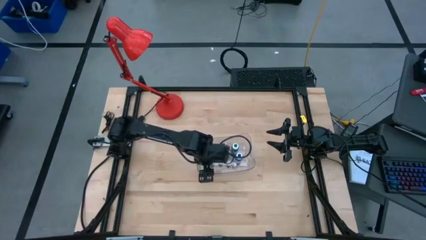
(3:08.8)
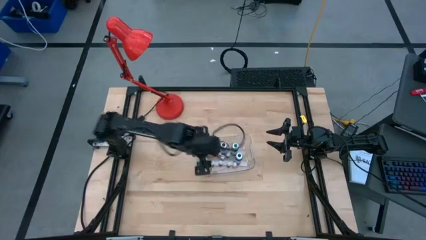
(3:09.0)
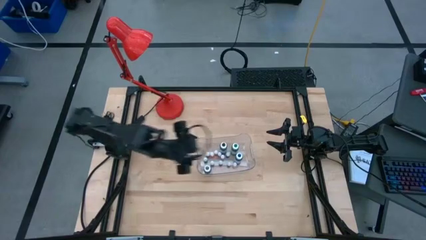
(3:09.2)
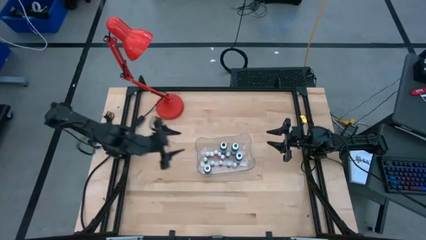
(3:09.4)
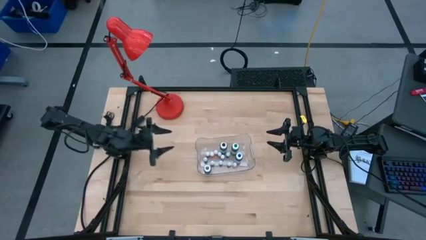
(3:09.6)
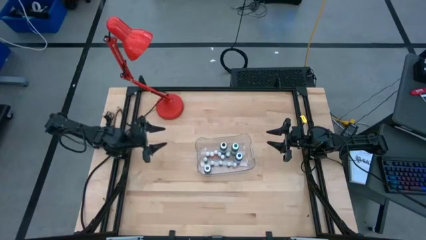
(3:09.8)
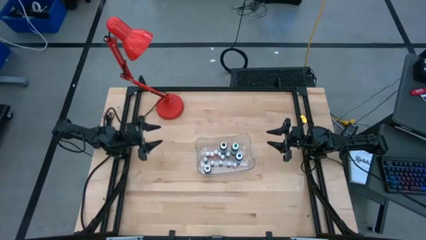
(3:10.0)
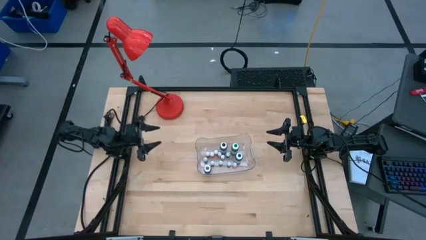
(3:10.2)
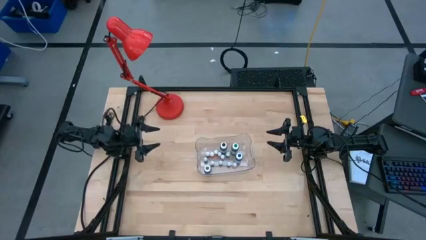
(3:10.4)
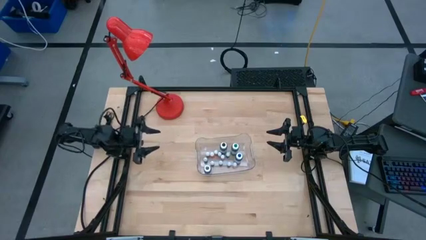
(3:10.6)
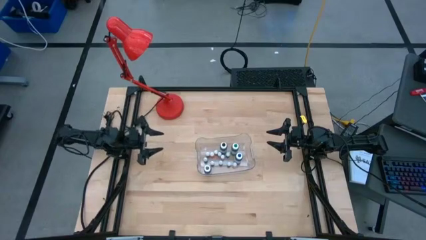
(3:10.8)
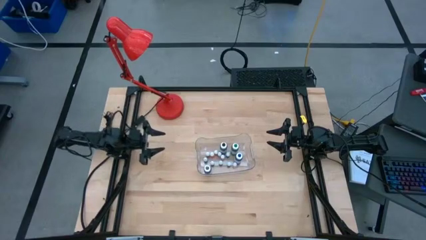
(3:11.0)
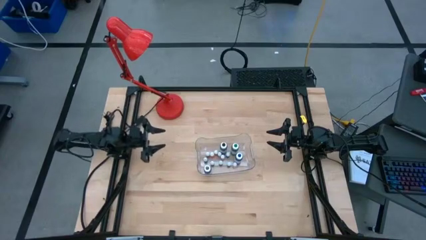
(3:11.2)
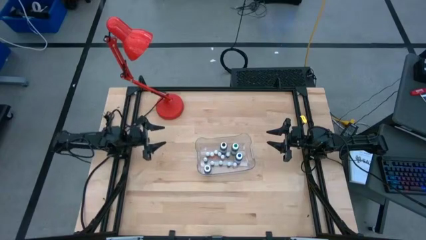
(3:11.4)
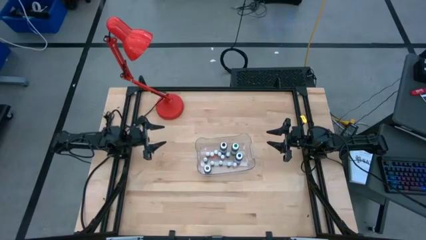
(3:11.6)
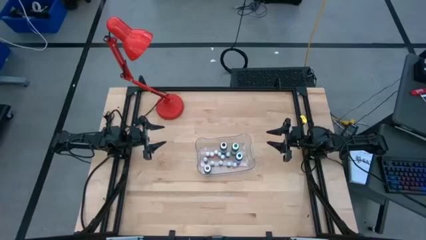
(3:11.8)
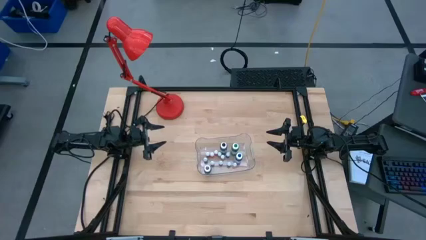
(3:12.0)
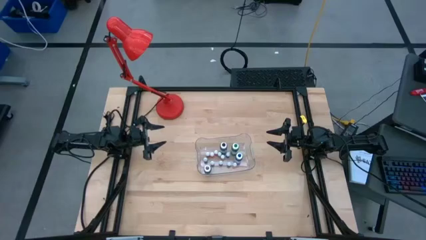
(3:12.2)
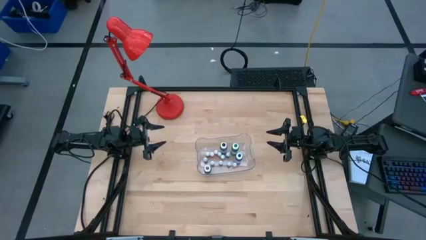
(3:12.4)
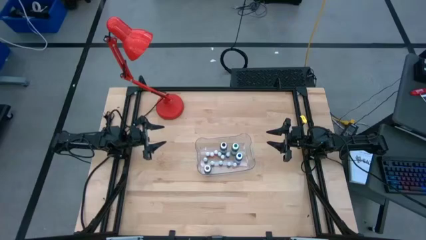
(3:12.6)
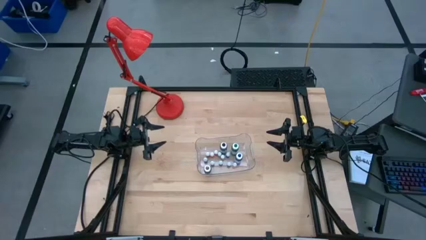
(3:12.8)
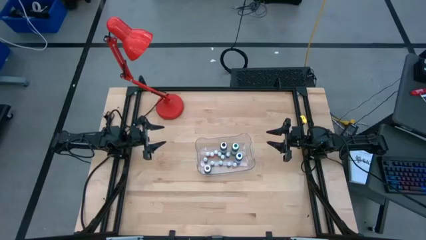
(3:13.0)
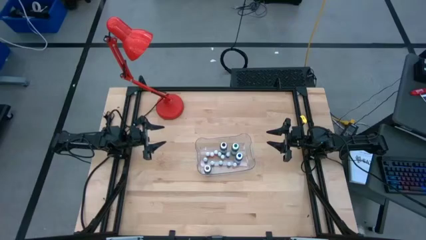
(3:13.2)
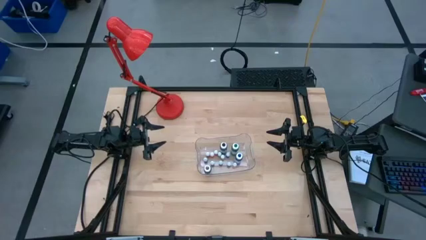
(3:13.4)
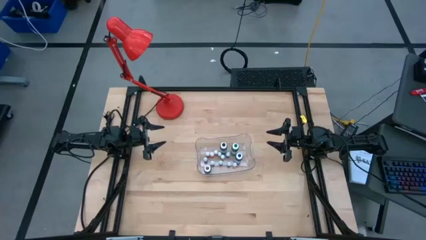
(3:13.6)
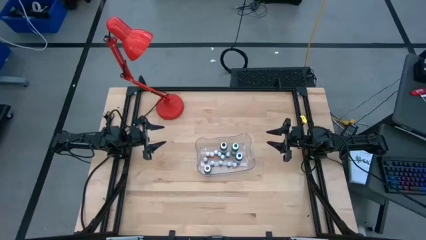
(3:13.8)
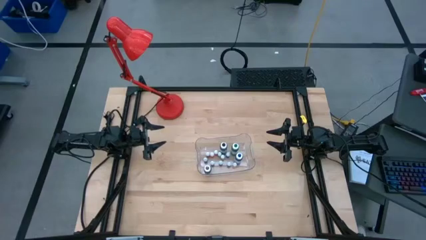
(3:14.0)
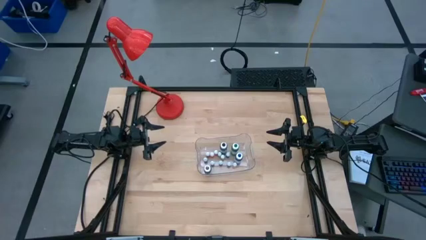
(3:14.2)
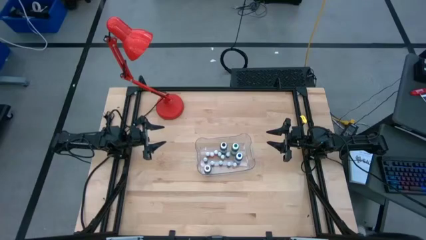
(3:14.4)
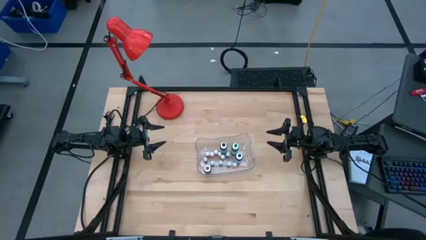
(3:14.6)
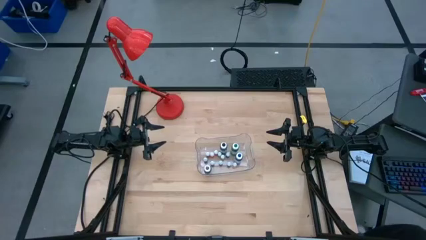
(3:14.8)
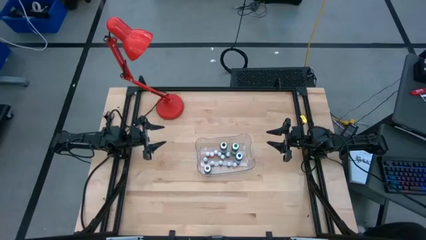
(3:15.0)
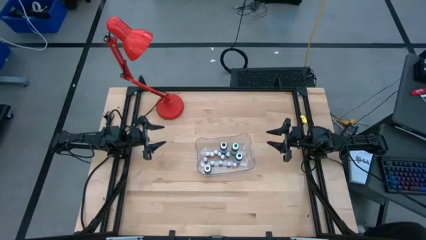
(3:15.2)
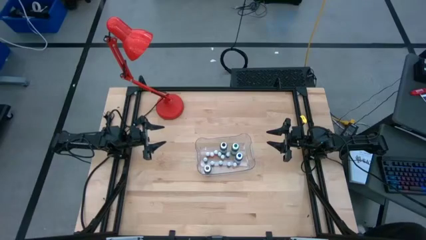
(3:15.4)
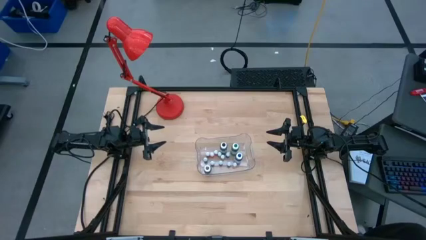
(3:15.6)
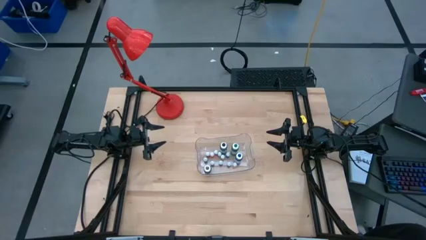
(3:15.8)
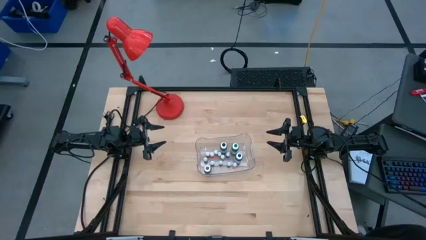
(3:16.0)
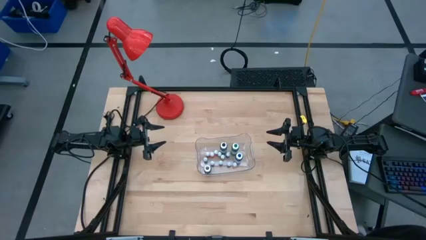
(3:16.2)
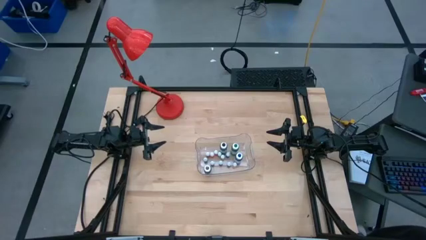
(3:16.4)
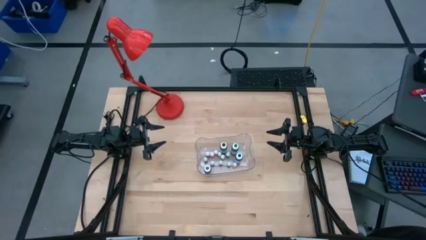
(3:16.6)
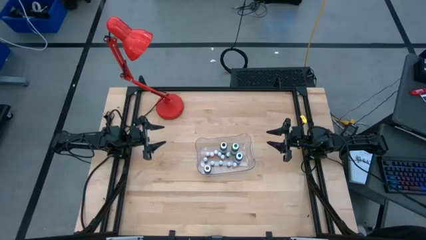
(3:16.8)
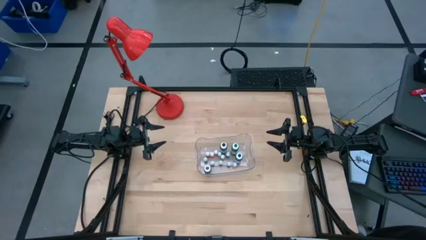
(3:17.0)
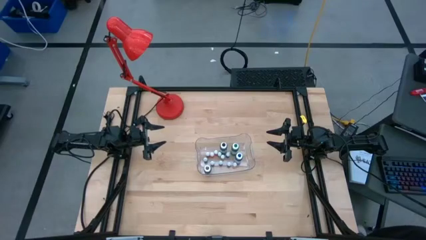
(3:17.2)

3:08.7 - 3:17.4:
Task: Pick & Place food coloring
Return to Home Position
